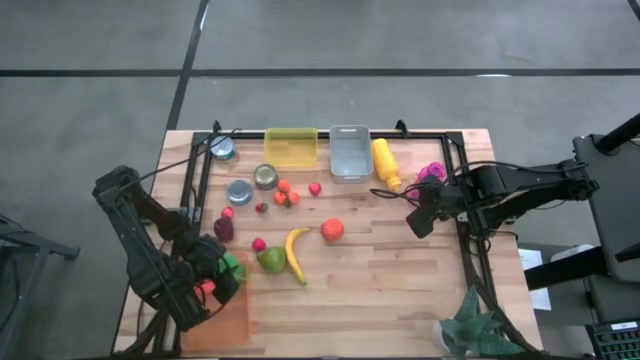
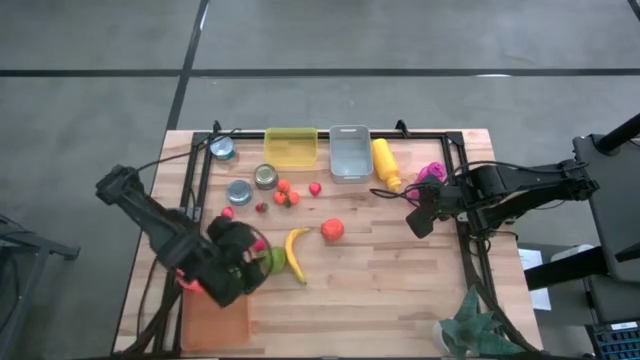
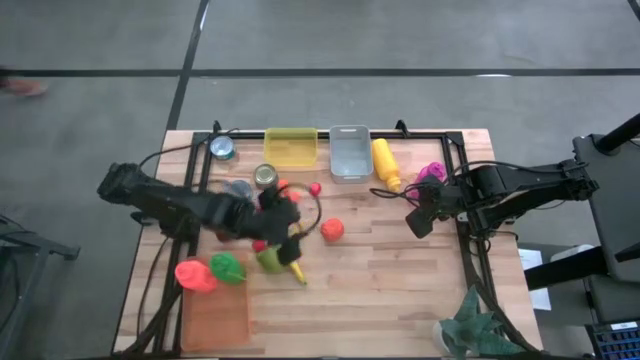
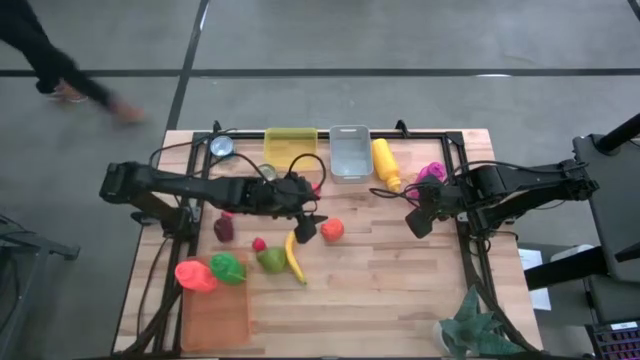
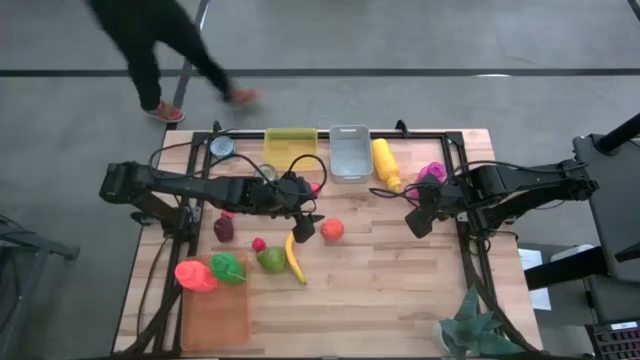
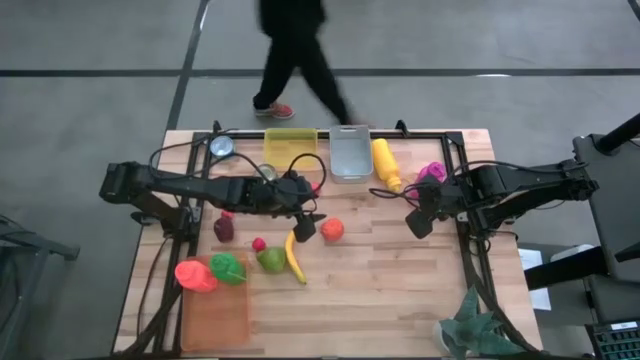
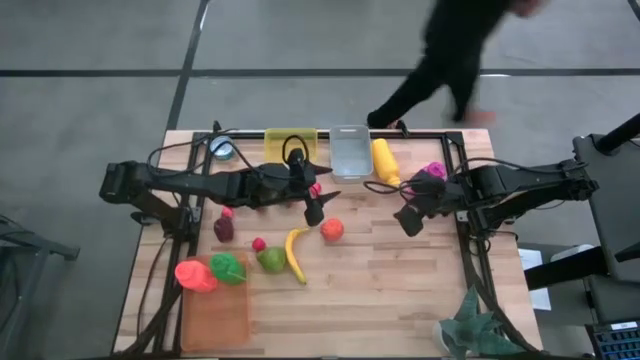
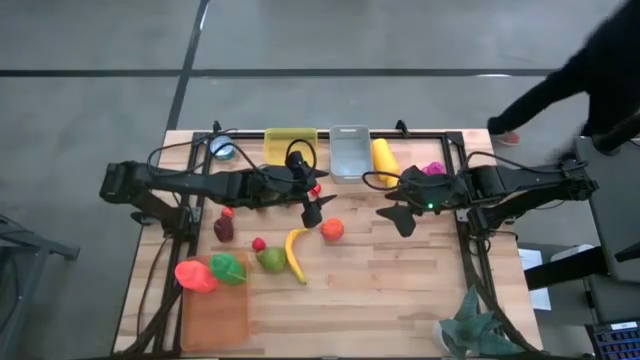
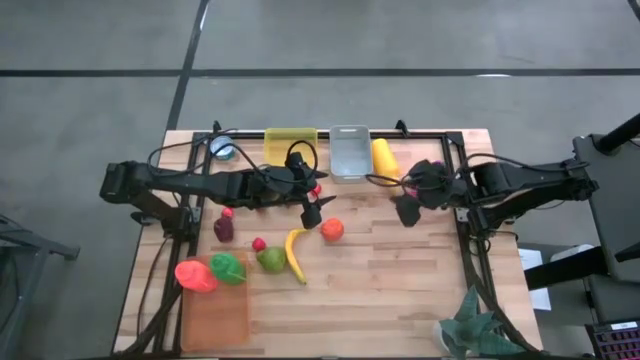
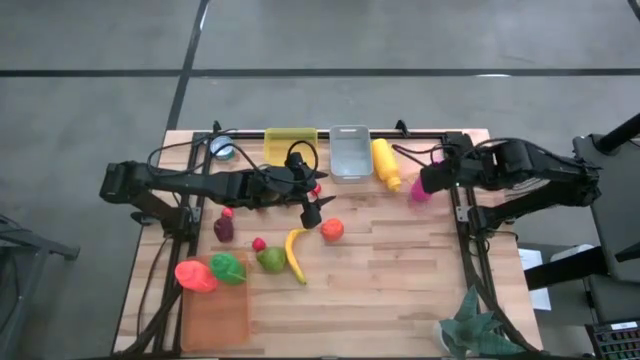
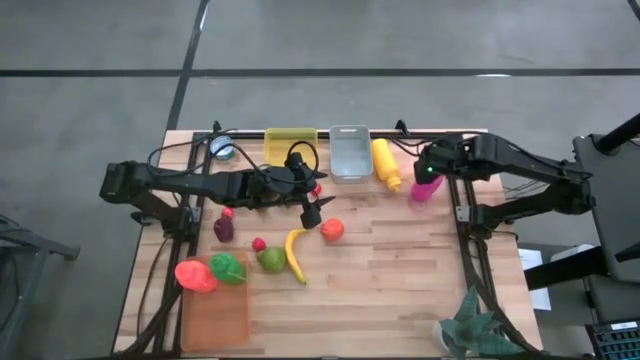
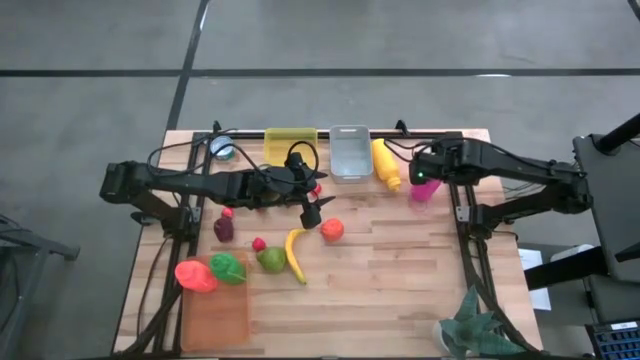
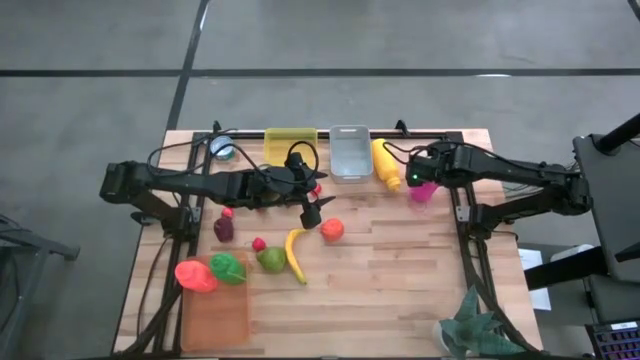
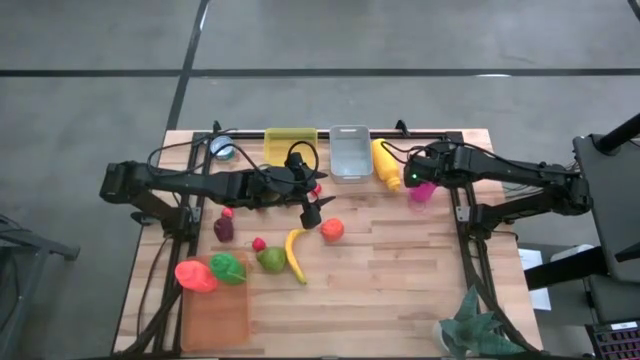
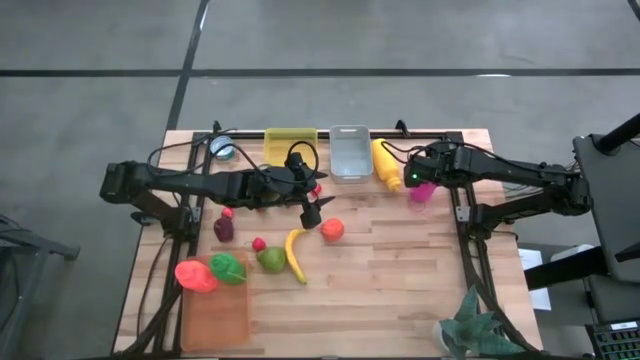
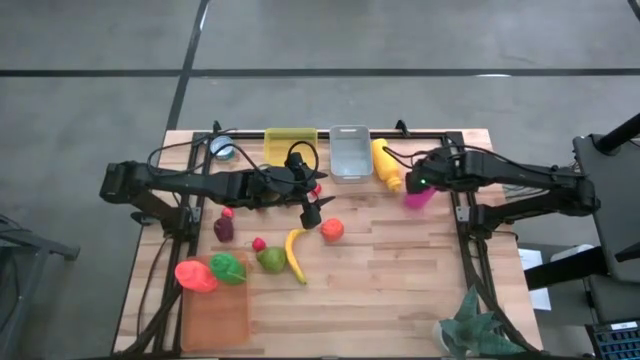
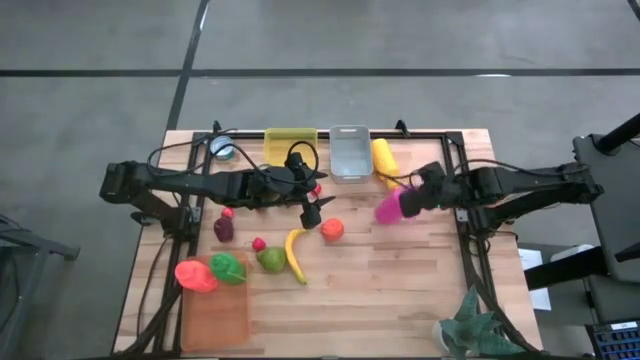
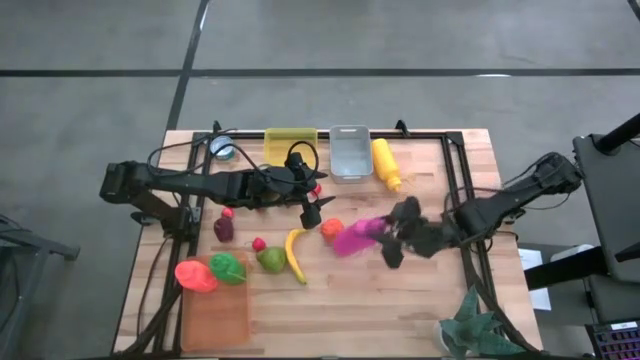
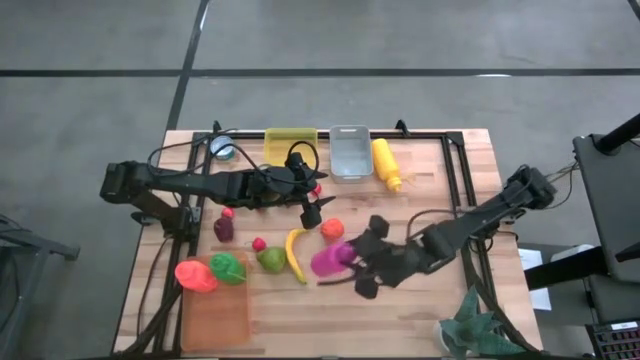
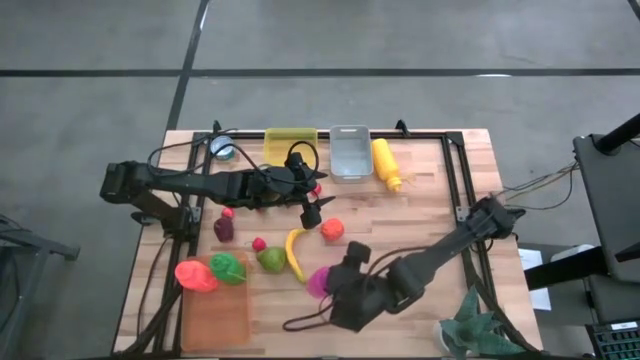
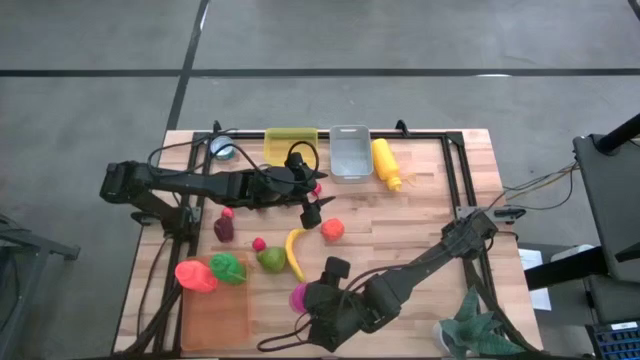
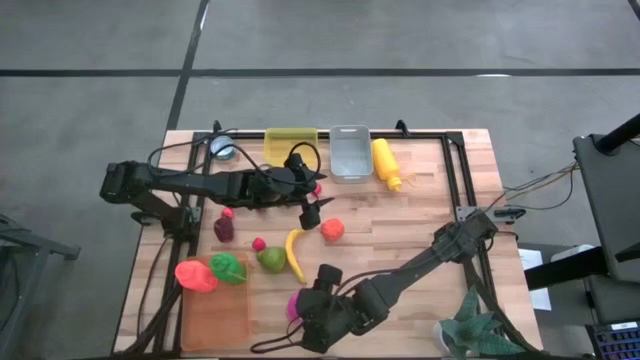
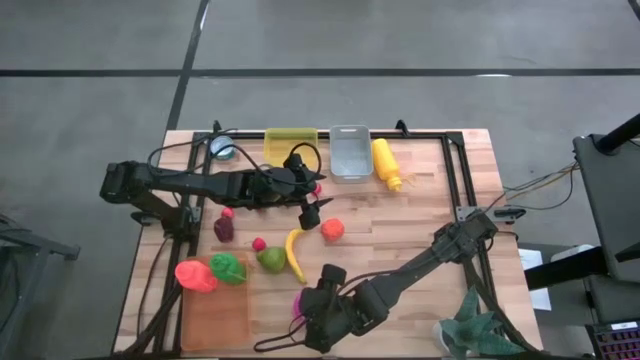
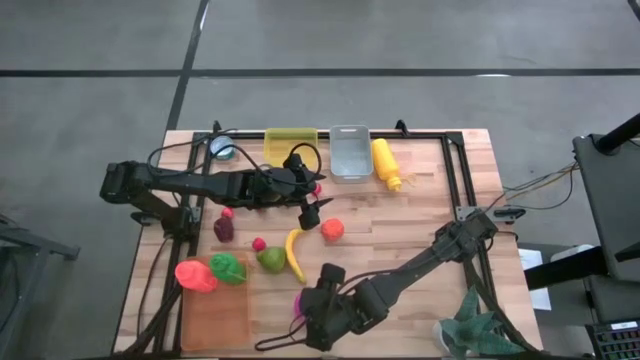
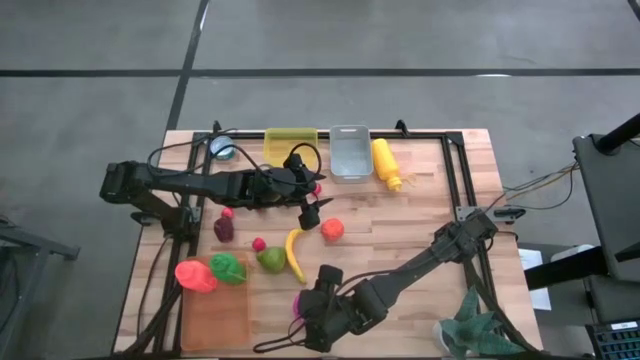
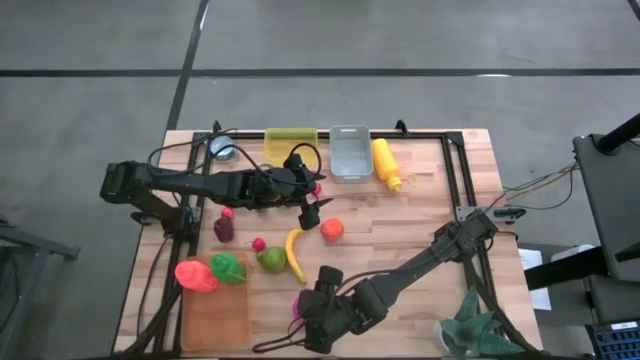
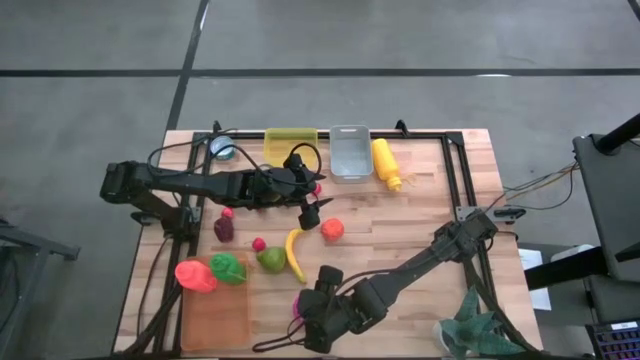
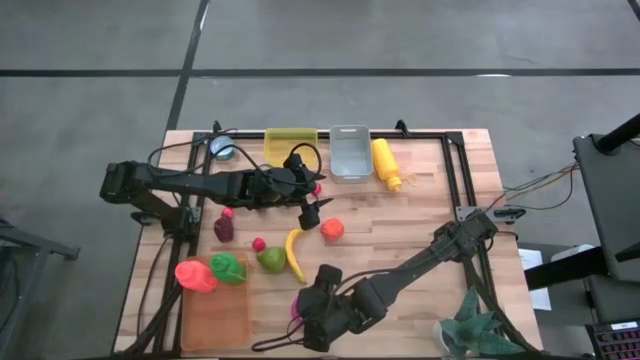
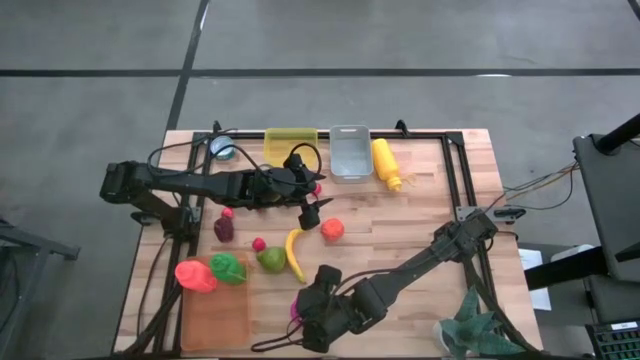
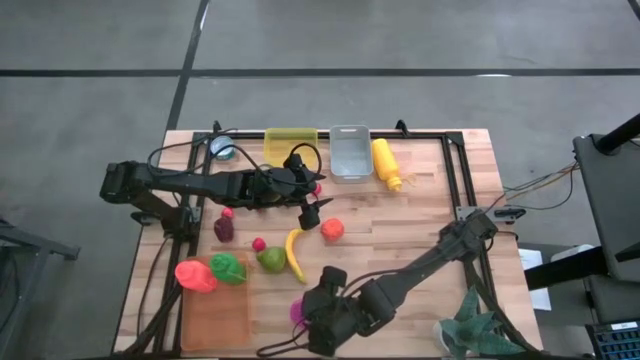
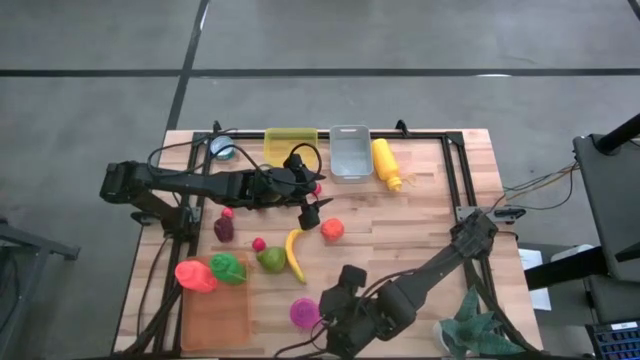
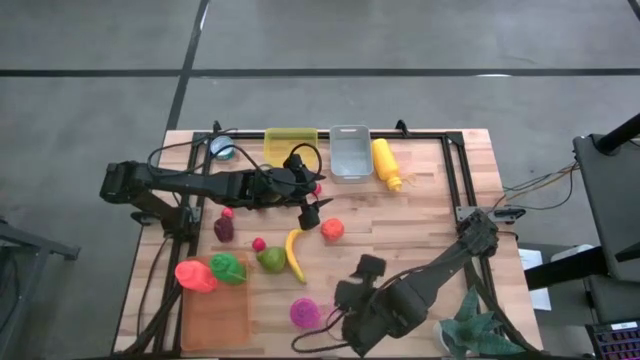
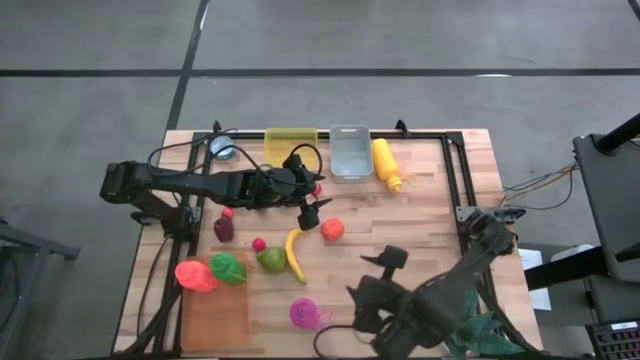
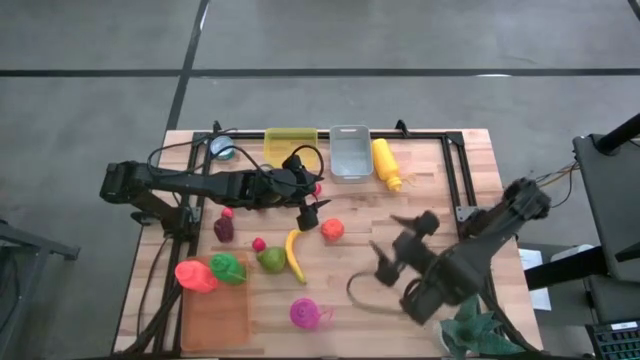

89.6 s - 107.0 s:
Task: Pick & Place Food Item
Put the pink tumbler into the orange bin

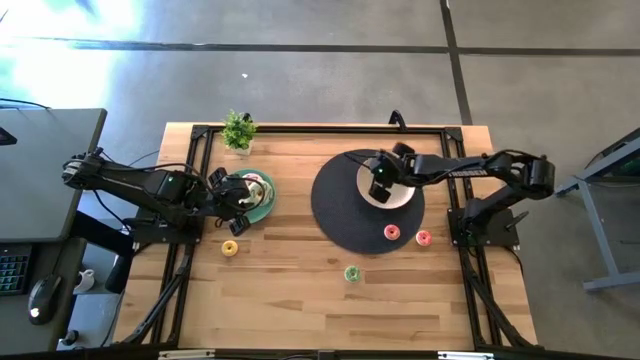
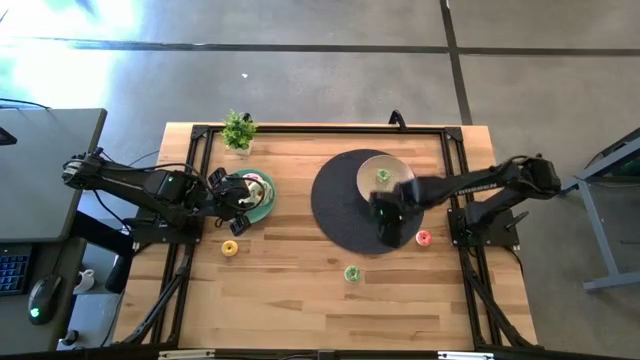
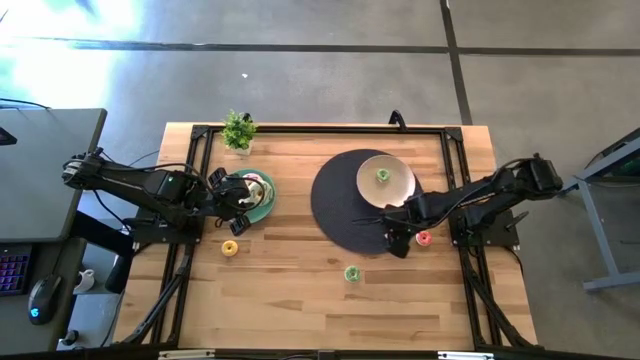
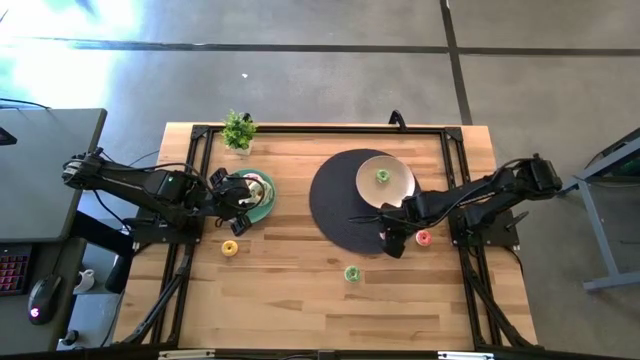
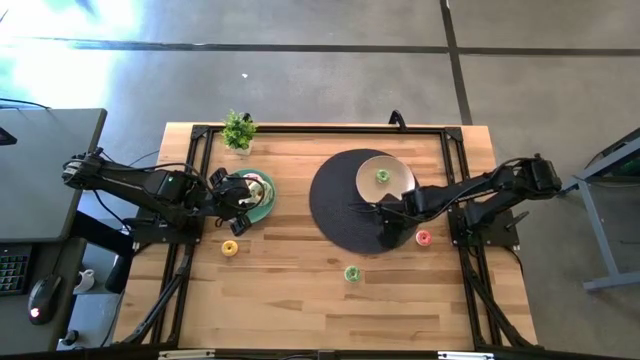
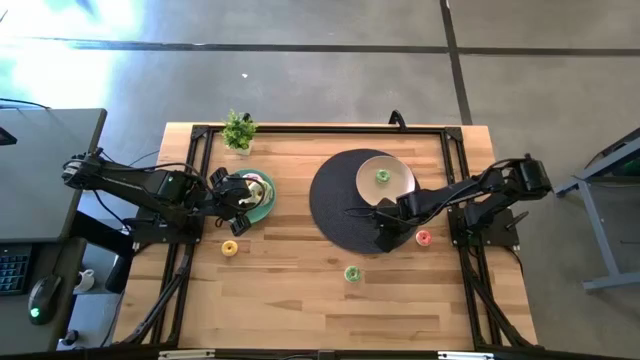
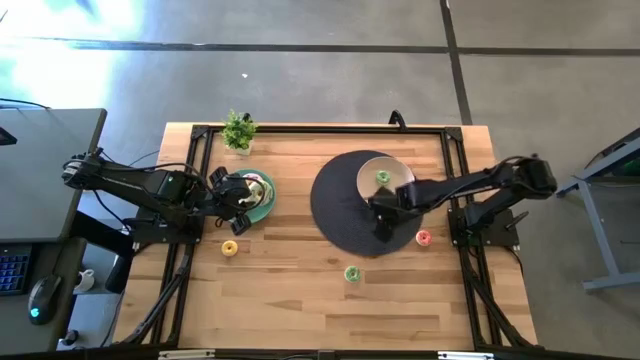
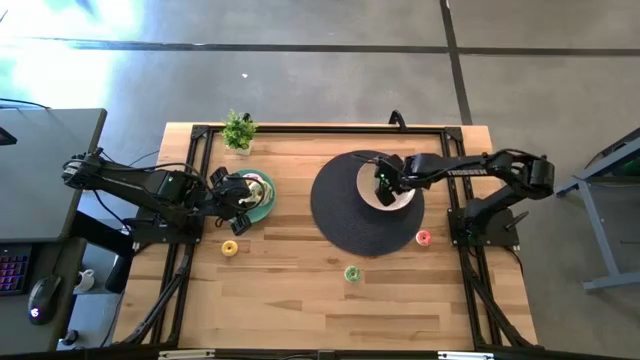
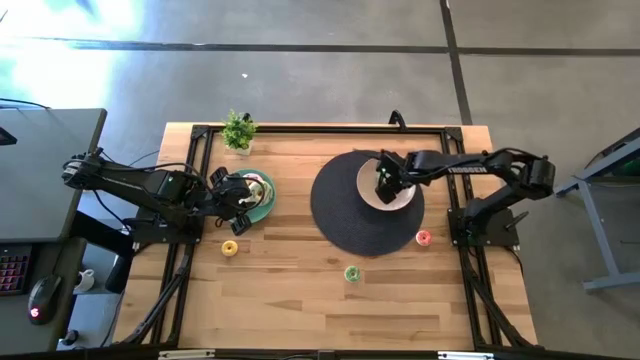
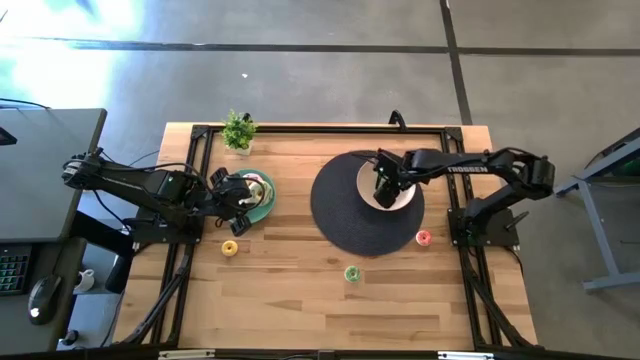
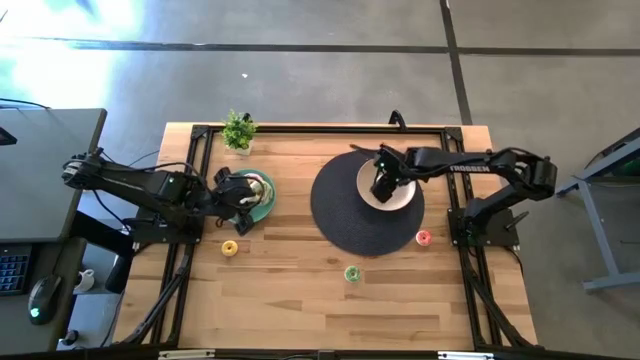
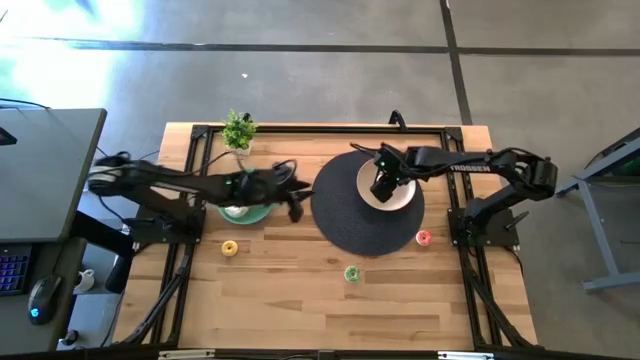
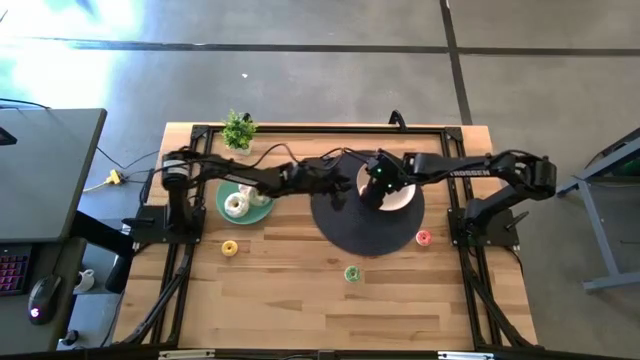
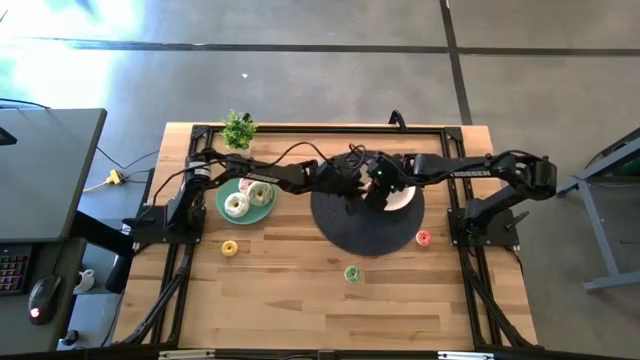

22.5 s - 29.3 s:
Task: Pick & Place donuts
Put the left pink donut into the white plate
